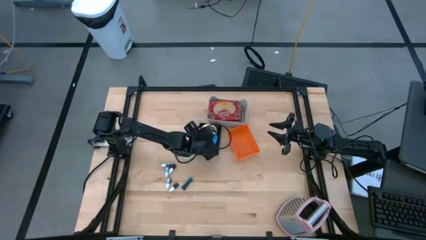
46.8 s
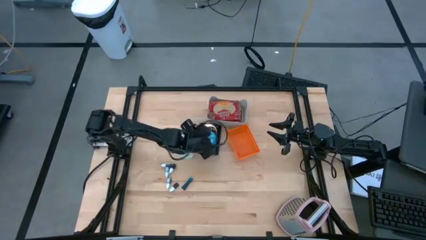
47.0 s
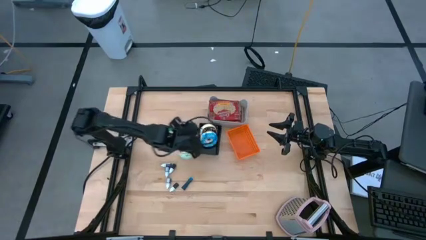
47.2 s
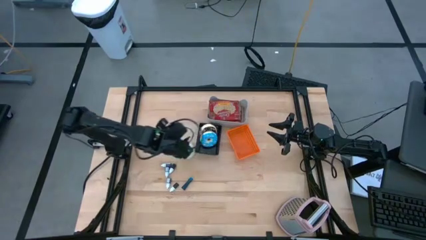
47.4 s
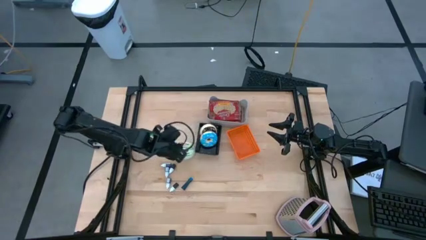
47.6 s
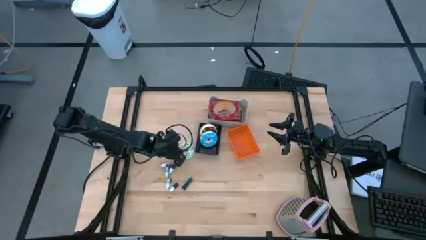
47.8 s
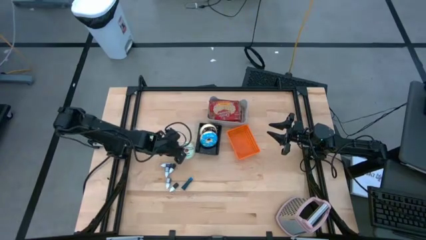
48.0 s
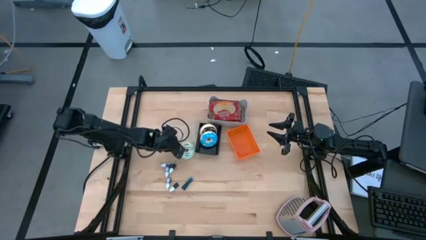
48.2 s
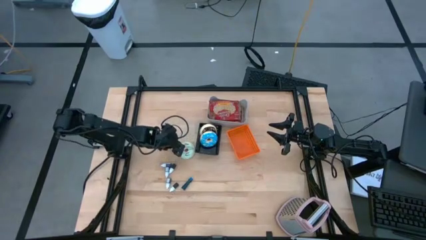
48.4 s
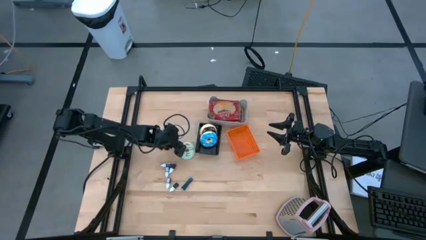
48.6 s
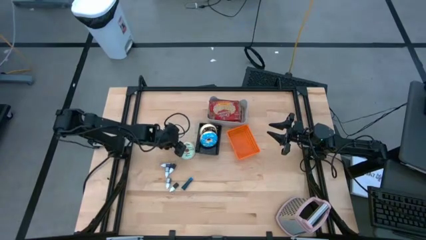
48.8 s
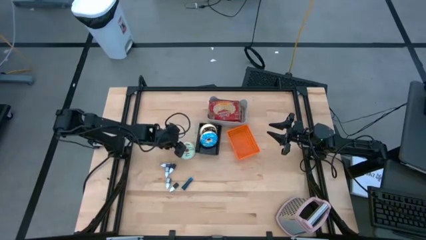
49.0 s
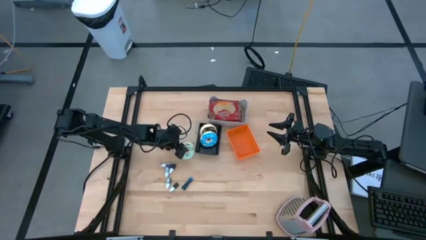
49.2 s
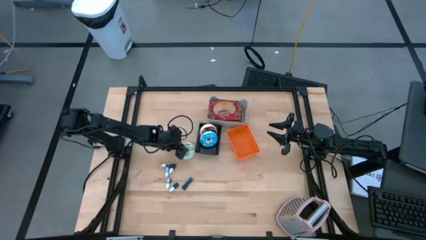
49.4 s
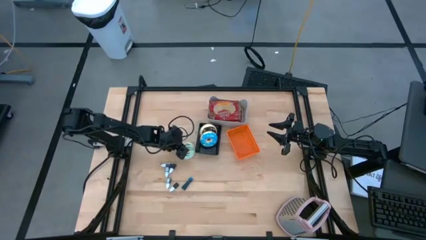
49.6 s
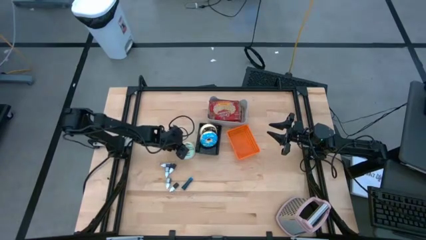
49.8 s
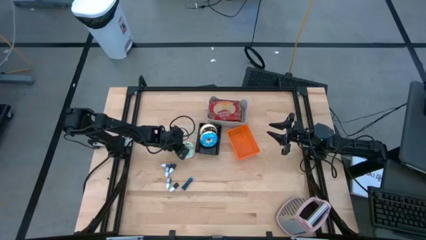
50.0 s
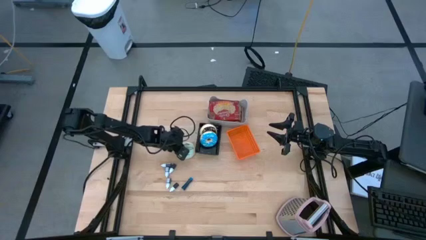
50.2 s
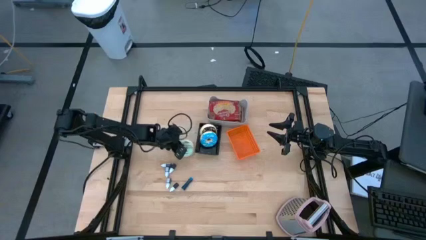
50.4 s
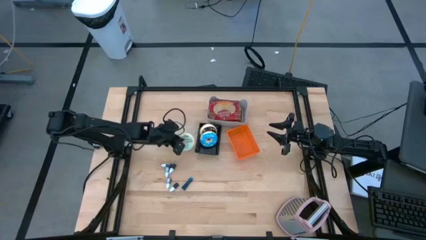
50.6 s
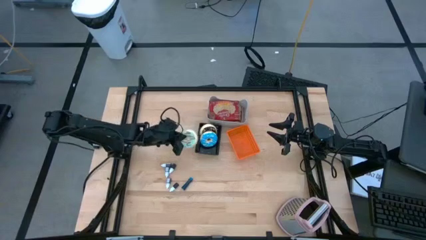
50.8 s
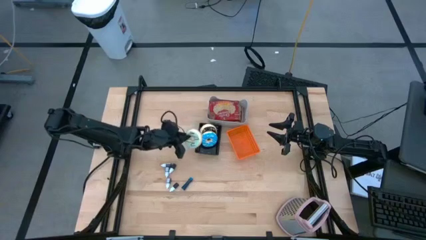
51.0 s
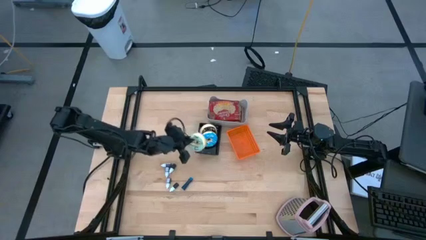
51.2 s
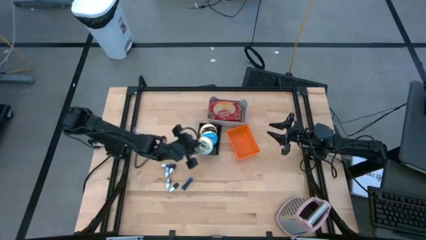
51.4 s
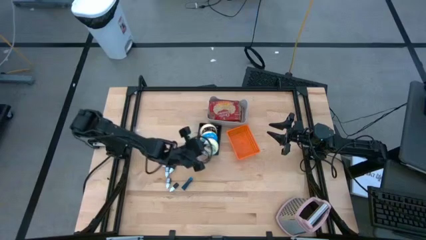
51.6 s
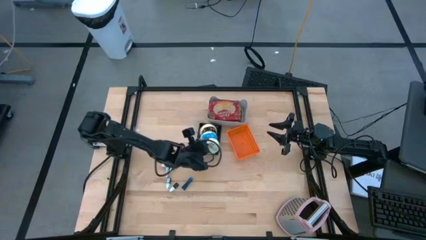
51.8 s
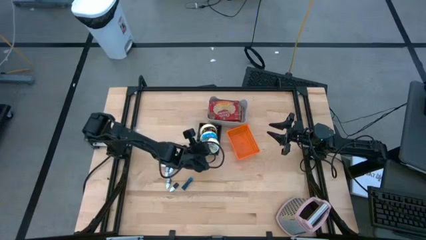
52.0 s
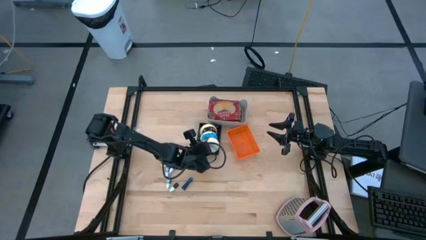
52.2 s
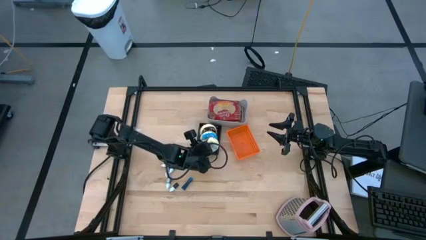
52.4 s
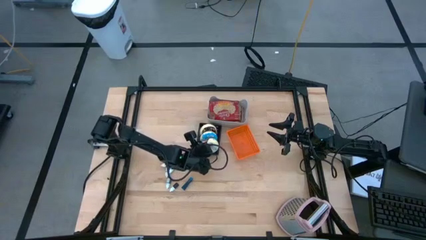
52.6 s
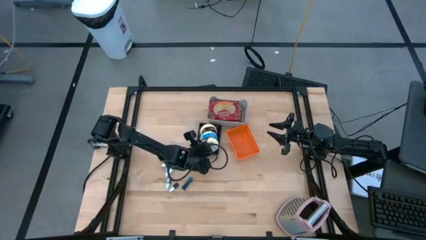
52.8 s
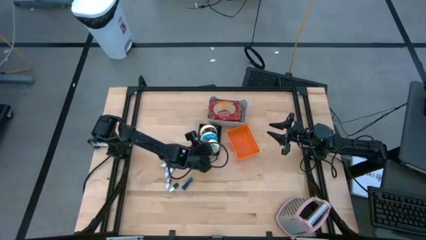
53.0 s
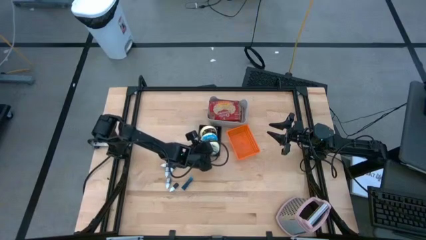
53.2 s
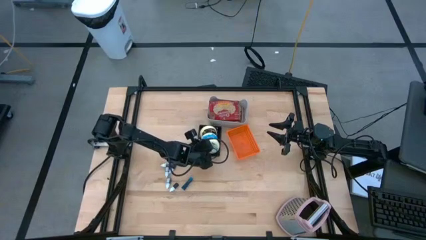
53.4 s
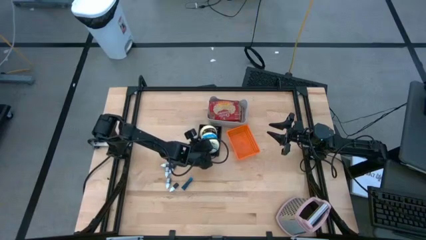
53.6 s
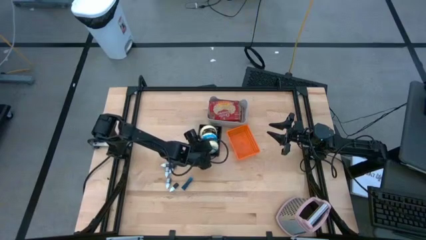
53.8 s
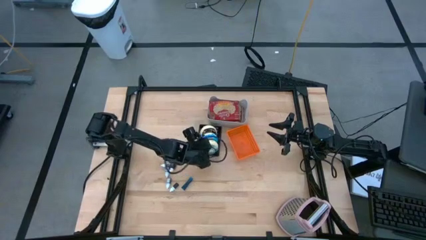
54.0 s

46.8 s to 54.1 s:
Put the light blue doughnut into the black bin

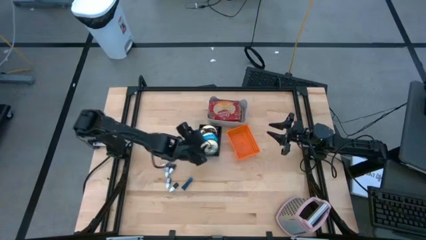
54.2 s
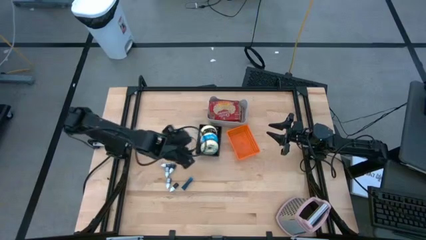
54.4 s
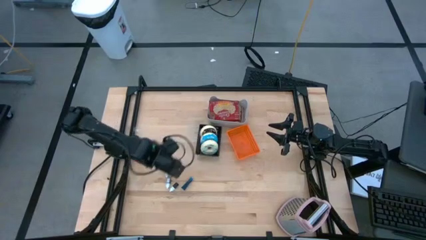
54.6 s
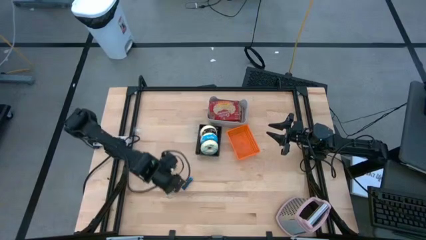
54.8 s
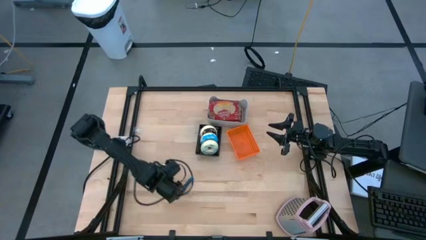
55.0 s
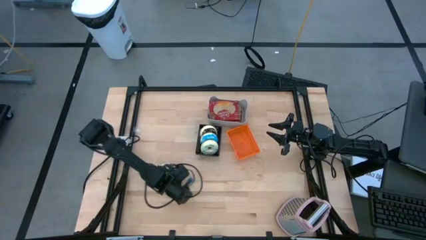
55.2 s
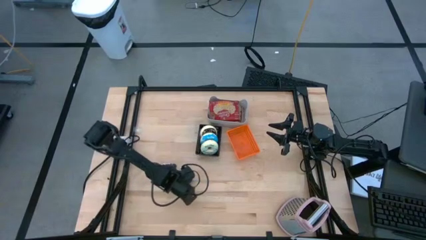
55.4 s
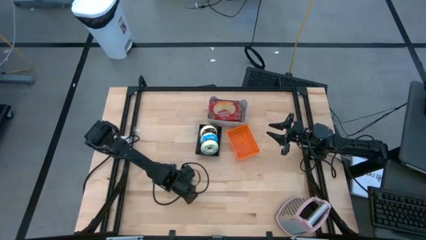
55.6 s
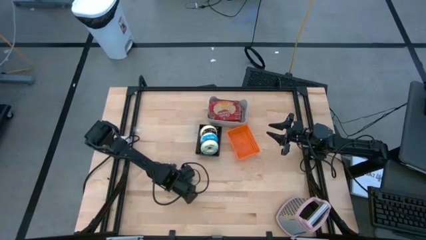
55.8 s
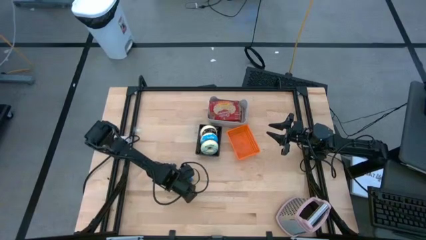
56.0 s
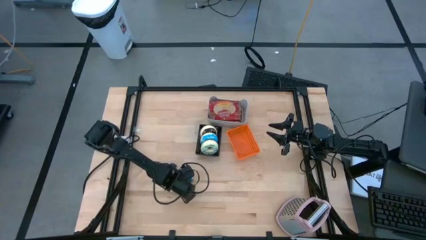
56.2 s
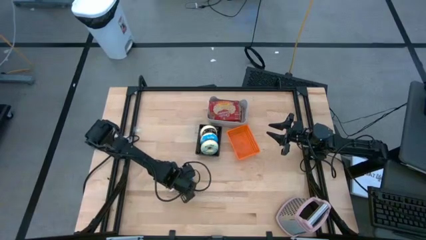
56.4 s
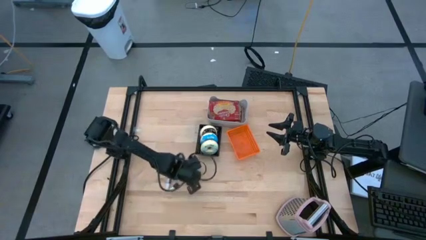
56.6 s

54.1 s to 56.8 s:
Put the blue food coloring into the orange bin

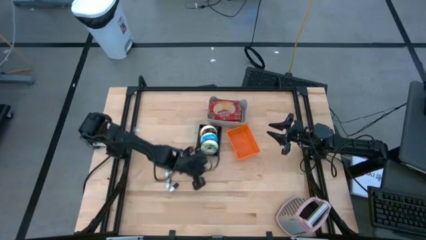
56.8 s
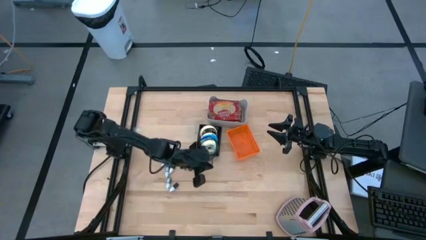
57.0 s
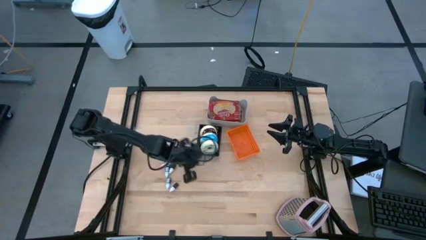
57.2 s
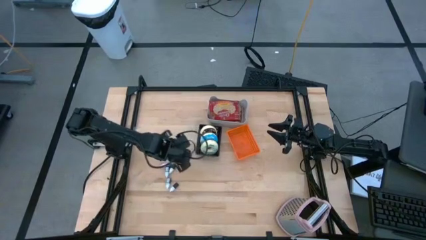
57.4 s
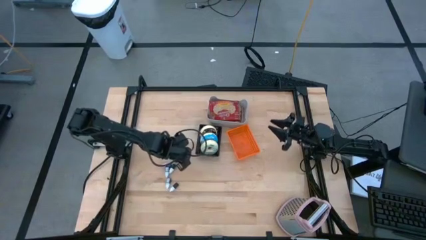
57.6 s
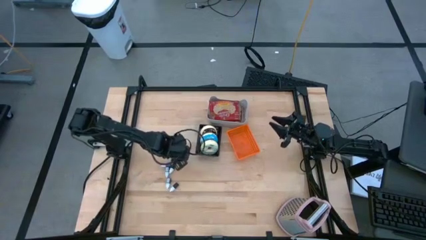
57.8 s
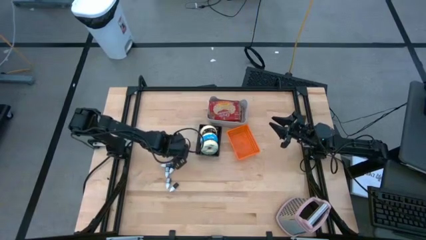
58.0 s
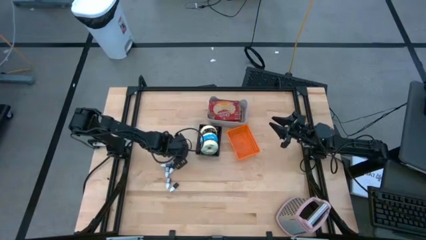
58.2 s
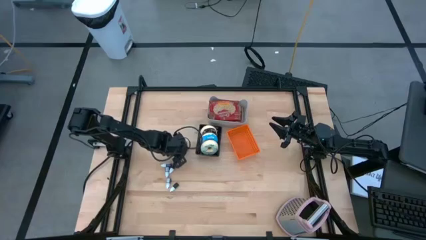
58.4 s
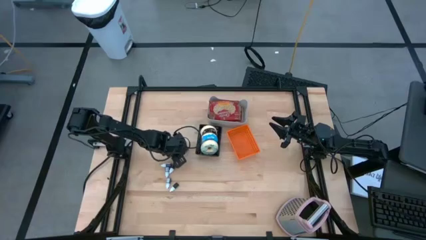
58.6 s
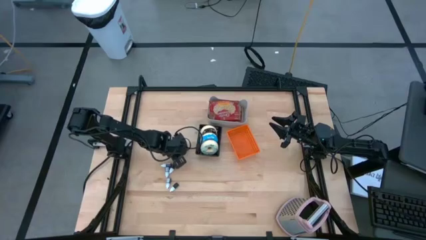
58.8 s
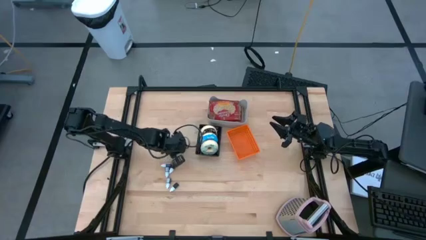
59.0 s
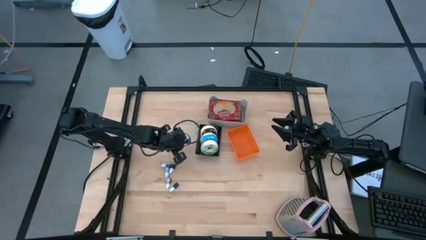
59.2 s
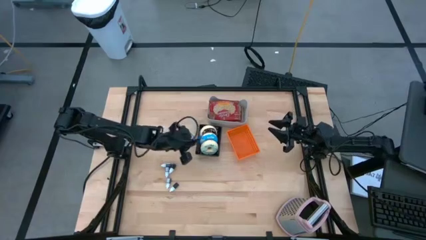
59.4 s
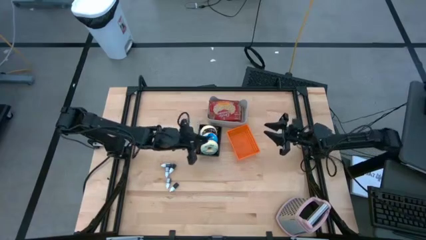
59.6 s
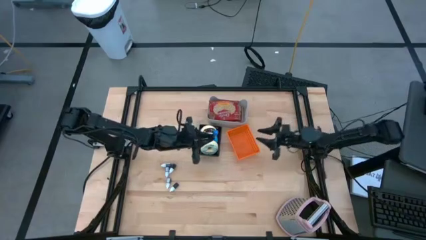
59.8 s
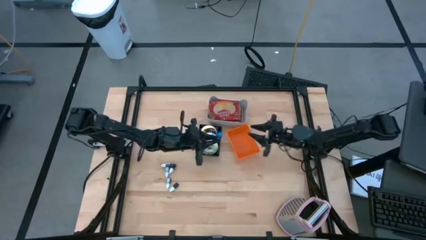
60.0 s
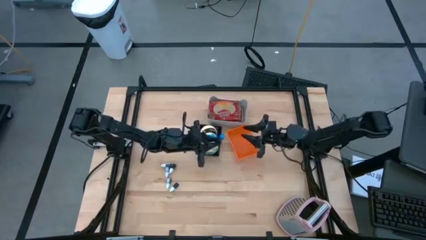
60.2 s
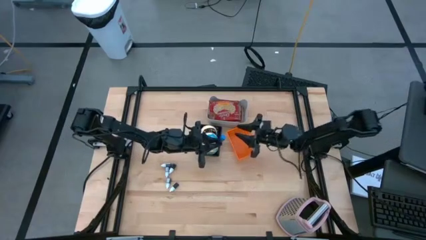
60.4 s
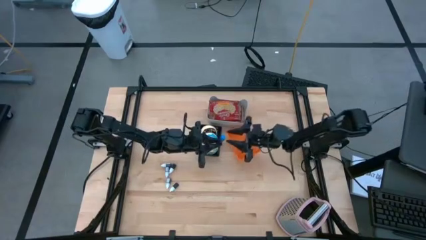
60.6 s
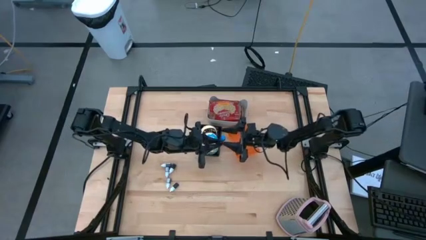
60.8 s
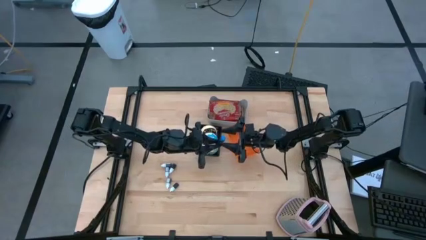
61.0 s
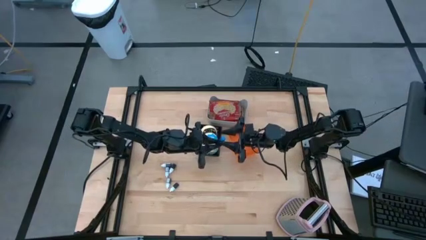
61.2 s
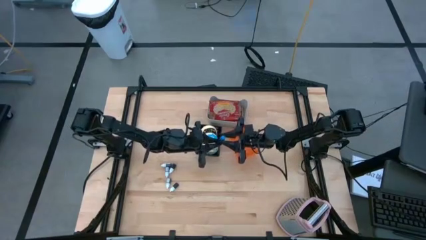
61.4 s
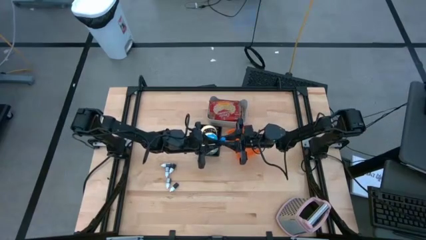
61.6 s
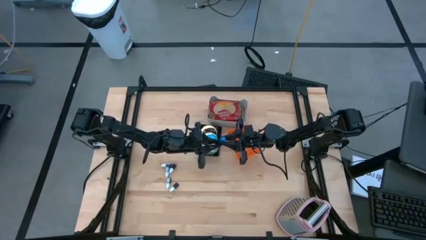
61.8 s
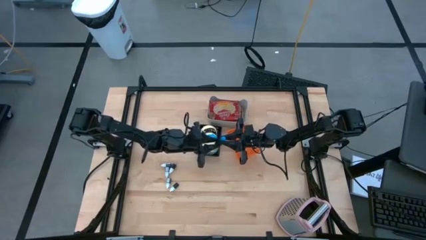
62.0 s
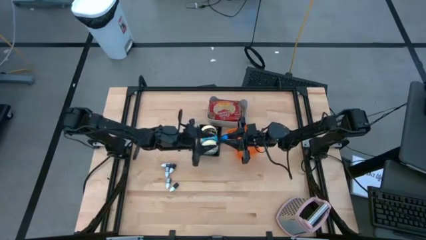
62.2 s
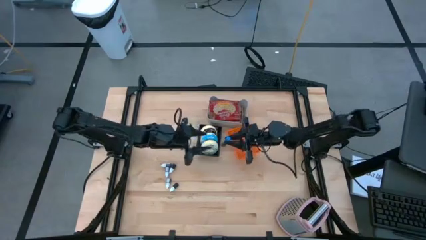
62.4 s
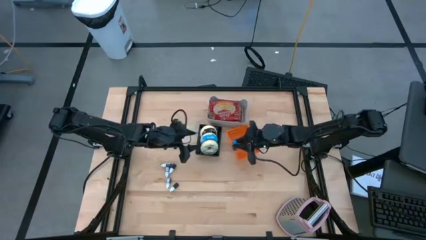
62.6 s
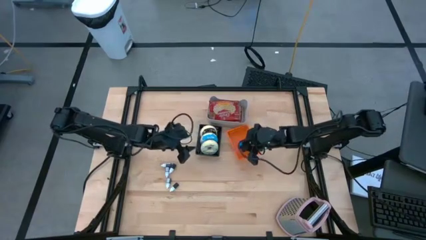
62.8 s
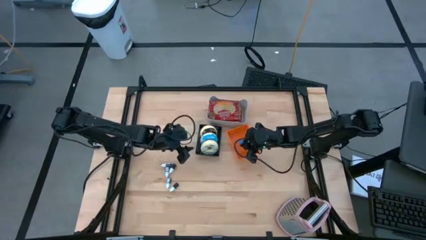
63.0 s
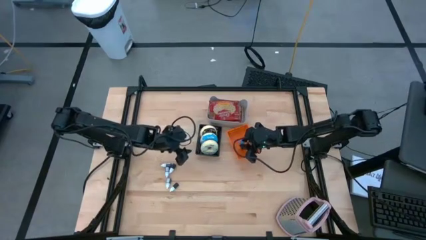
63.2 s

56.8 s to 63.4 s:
Put the blue food coloring into the orange bin
